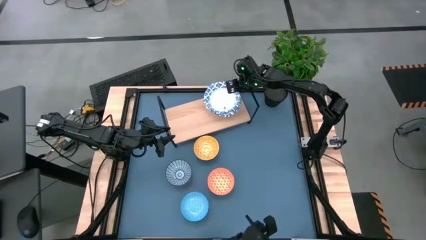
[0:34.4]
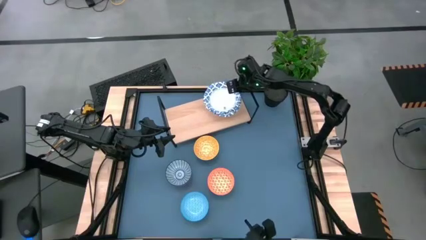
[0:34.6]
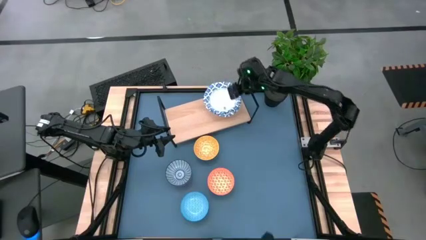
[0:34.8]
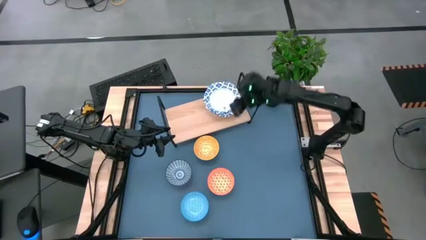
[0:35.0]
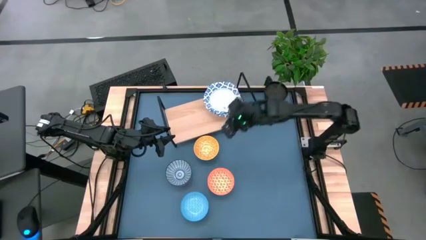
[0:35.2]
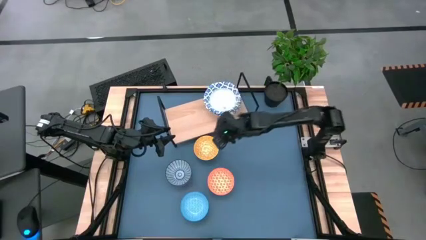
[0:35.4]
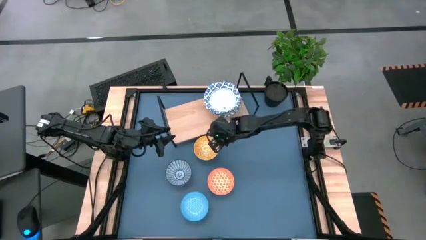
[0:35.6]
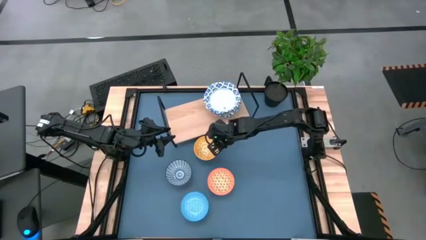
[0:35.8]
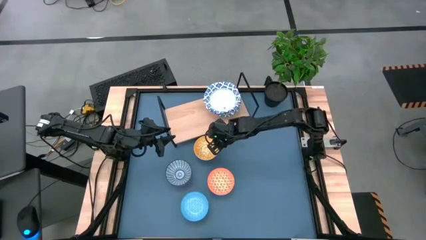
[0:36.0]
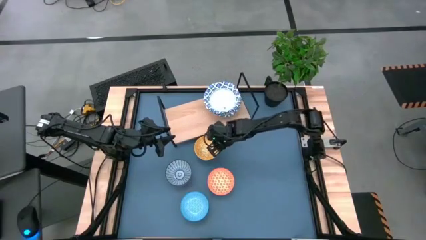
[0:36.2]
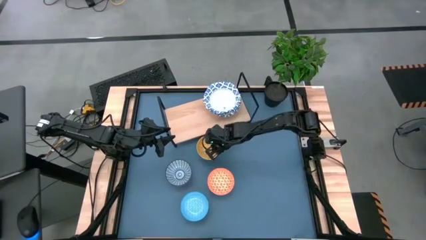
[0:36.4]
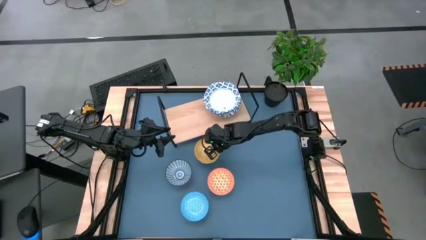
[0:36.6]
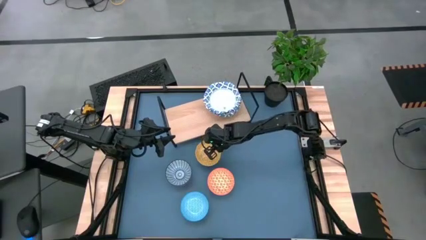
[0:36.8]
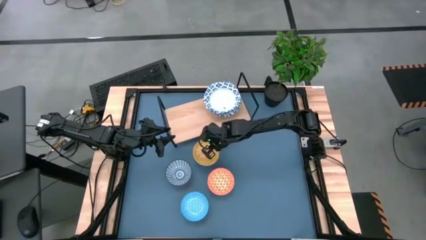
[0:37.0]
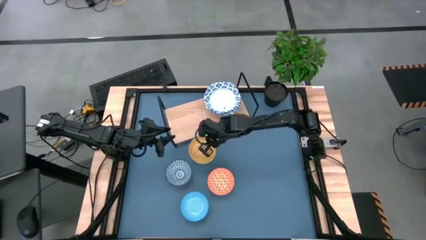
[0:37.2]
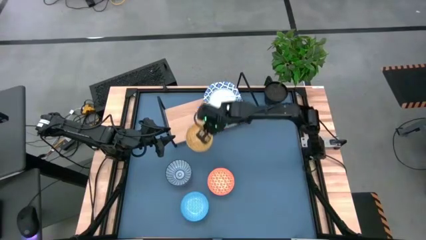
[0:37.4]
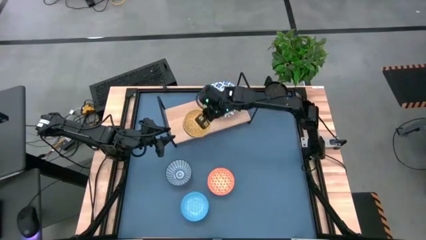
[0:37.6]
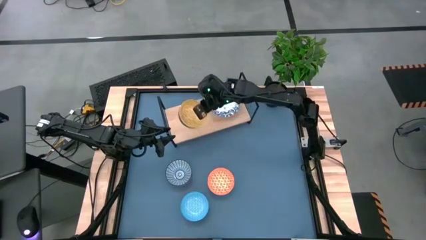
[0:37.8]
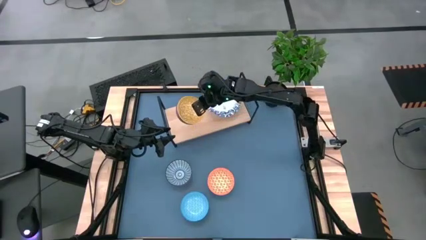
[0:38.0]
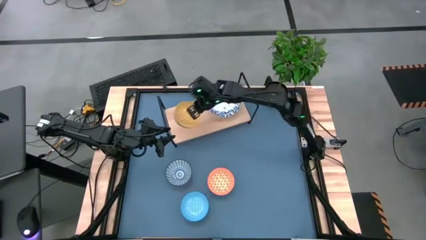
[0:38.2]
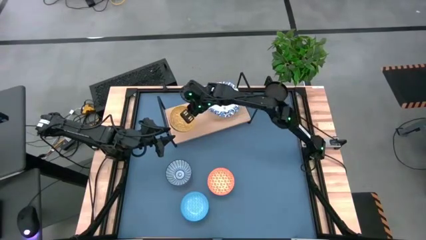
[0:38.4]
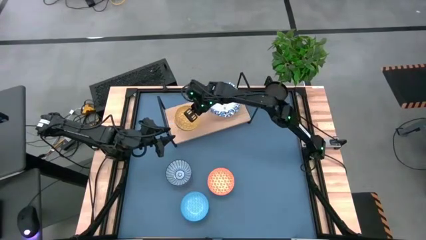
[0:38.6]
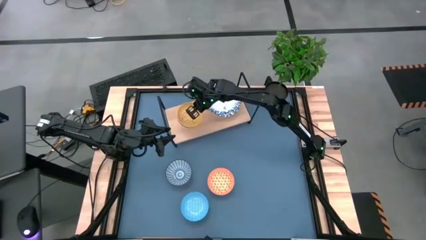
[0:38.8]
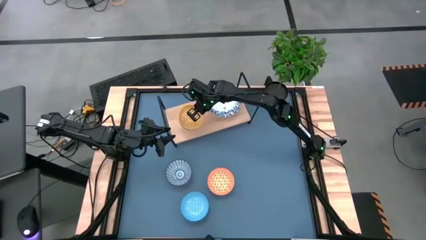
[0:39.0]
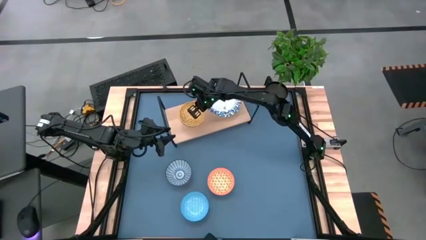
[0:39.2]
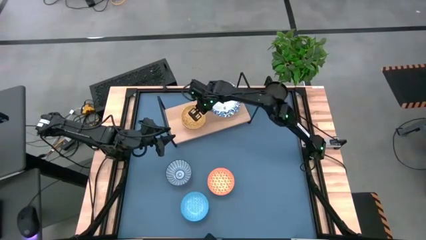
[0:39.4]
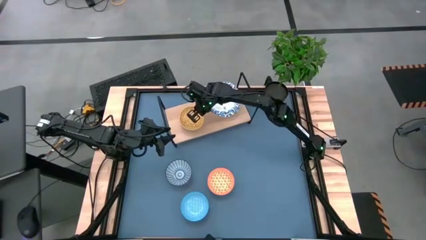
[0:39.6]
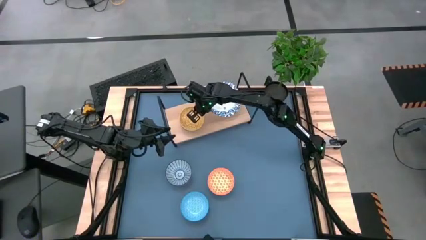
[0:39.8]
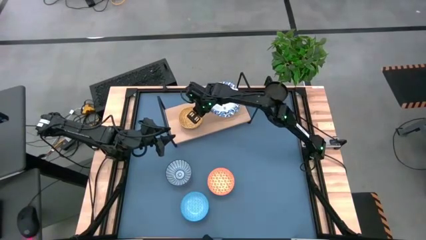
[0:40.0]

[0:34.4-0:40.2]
Task: Place and stack bowls onto a shelf
Put the yellow patterned bowl on the shelf

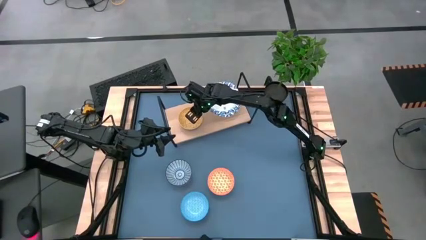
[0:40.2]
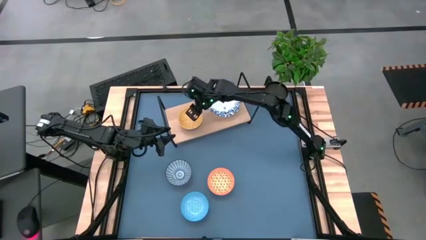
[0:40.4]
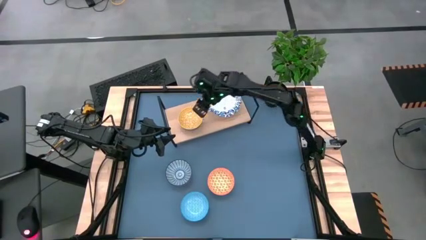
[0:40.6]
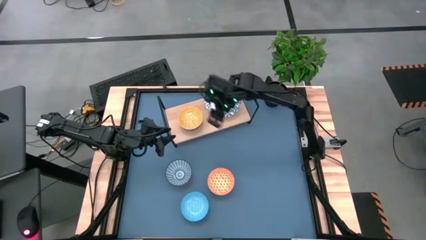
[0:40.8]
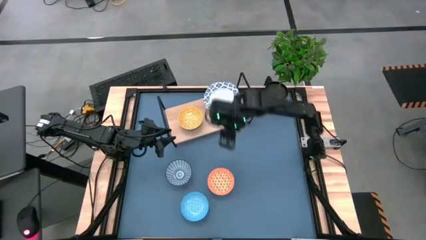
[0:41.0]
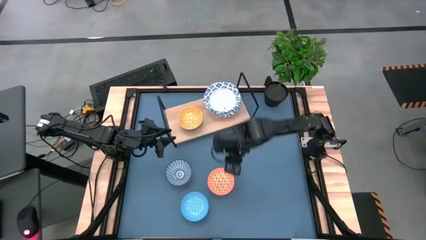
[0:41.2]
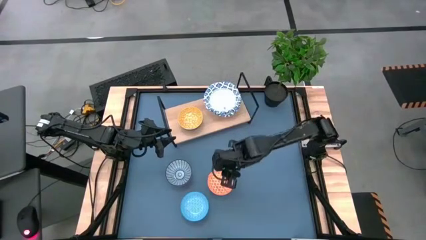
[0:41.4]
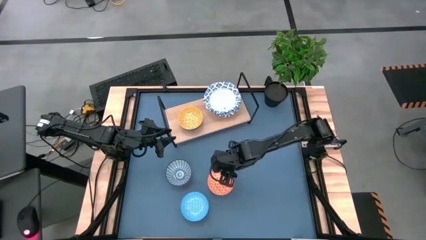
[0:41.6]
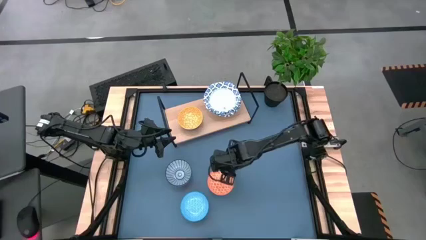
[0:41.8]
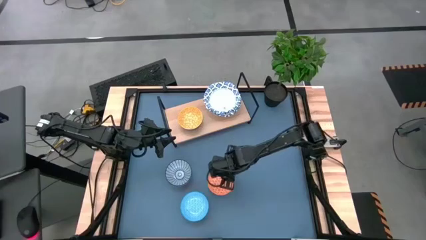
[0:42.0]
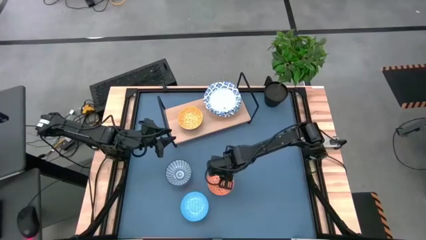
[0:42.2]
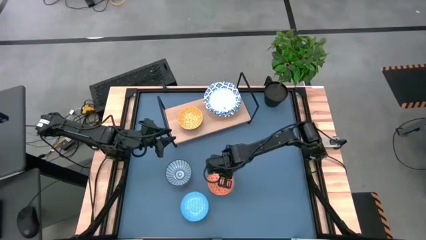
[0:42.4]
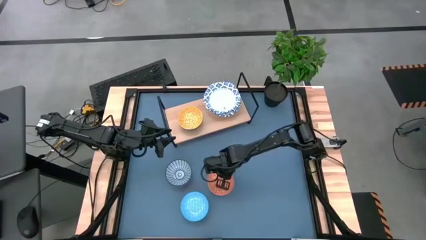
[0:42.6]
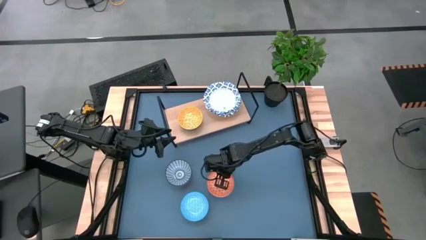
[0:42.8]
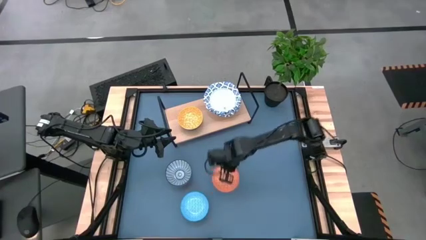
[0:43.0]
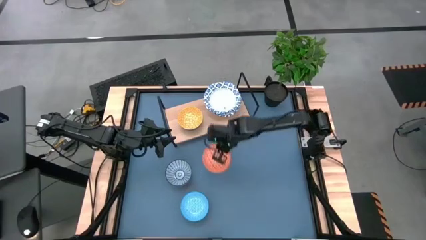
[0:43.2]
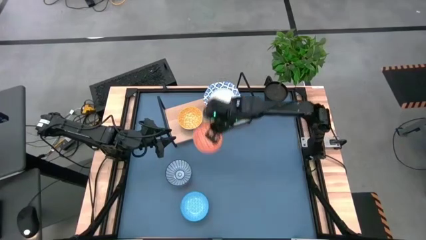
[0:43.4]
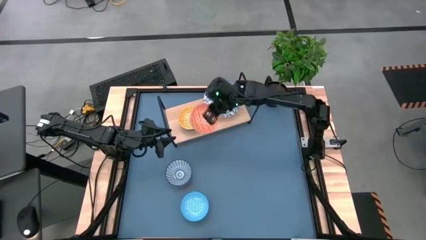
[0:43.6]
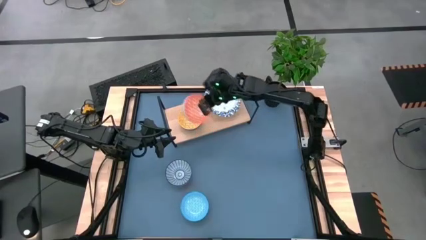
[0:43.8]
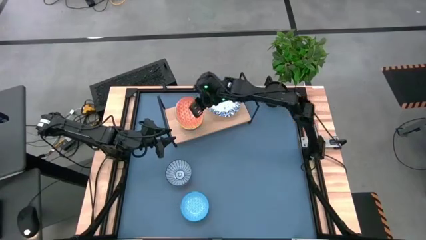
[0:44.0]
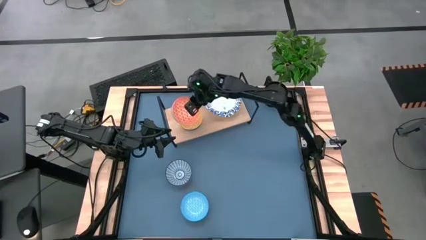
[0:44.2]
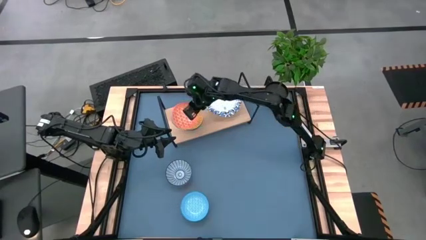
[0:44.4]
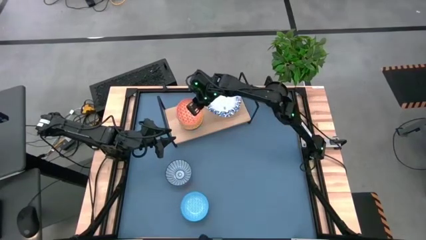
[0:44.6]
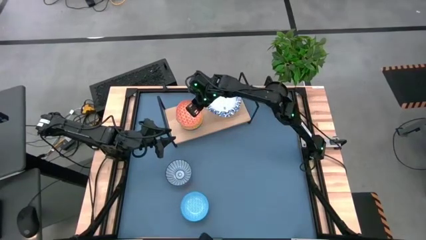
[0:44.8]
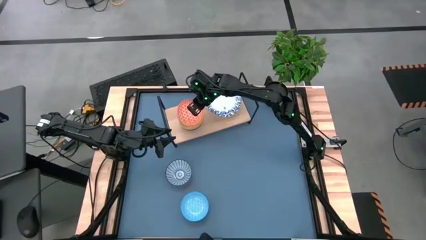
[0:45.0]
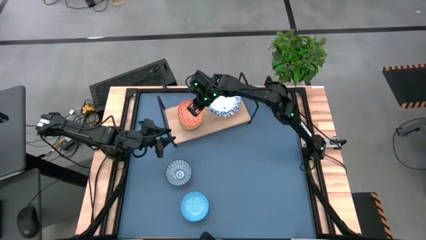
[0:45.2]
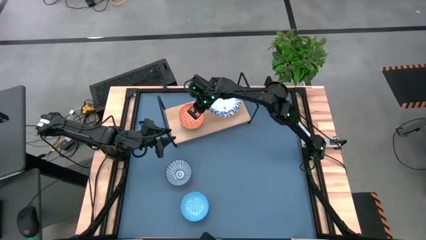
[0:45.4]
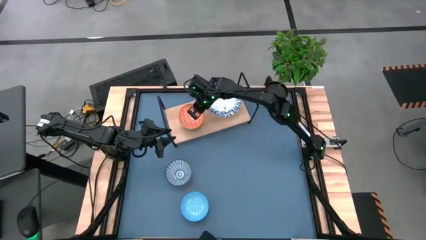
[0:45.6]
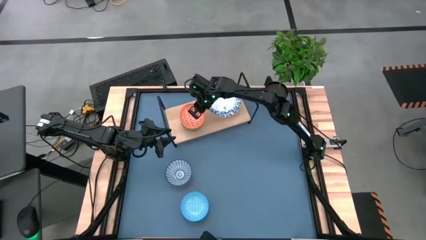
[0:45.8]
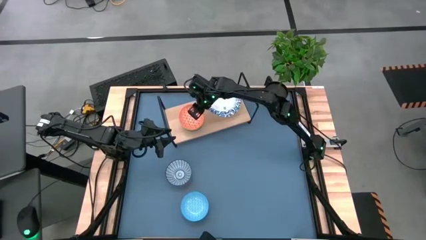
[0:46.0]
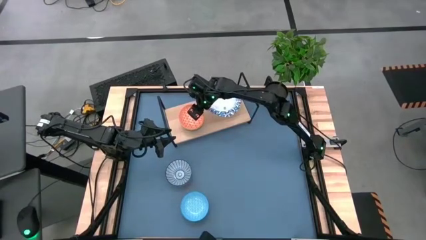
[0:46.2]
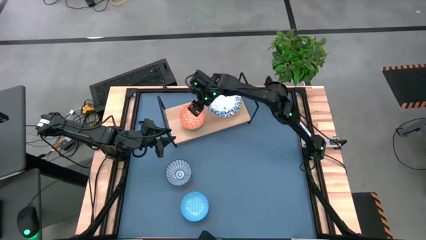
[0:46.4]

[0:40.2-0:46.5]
Stack the orange patterned bowl on top of the yellow patterned bowl on the shelf

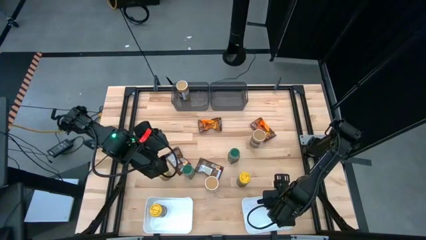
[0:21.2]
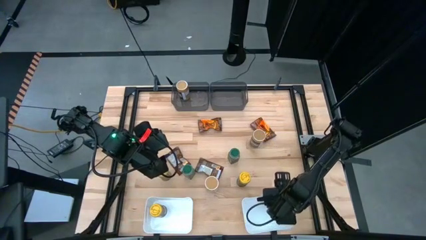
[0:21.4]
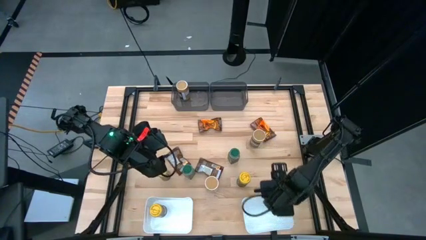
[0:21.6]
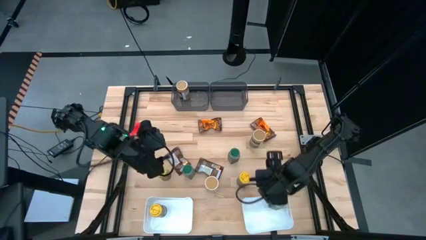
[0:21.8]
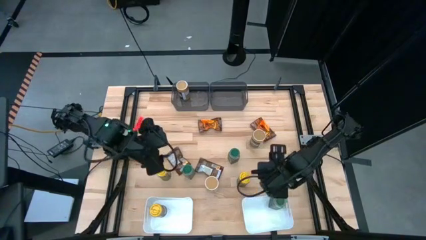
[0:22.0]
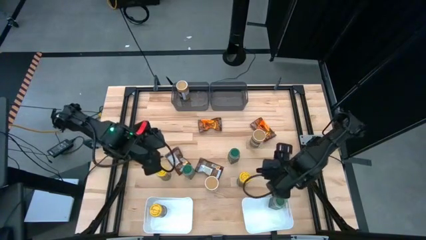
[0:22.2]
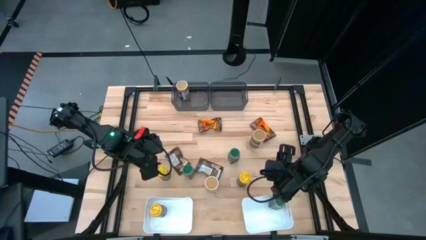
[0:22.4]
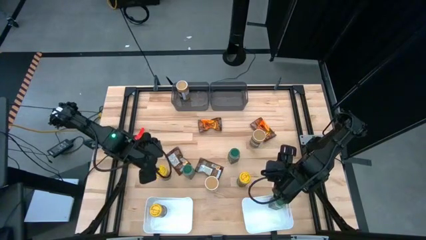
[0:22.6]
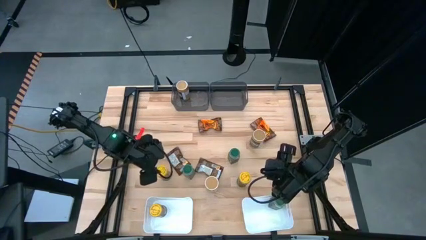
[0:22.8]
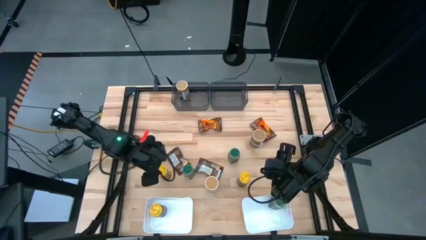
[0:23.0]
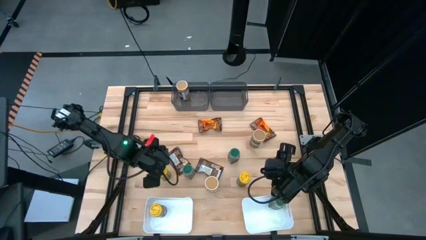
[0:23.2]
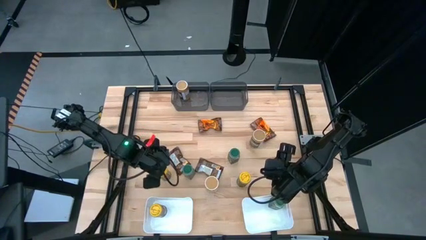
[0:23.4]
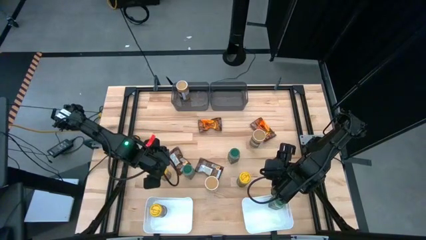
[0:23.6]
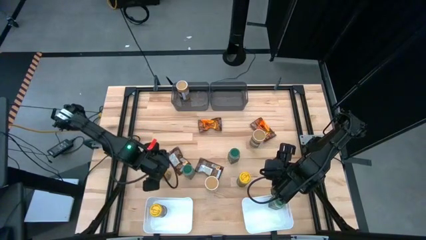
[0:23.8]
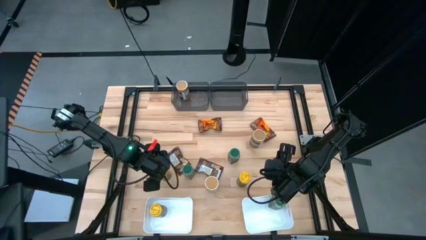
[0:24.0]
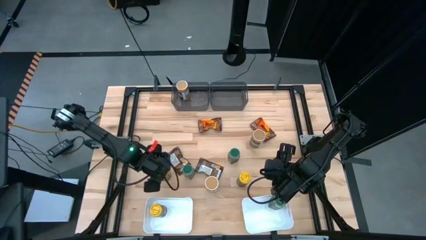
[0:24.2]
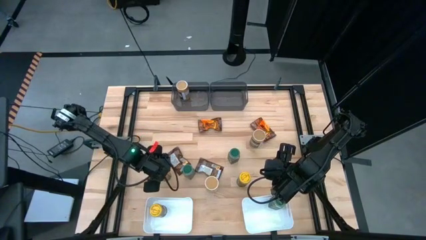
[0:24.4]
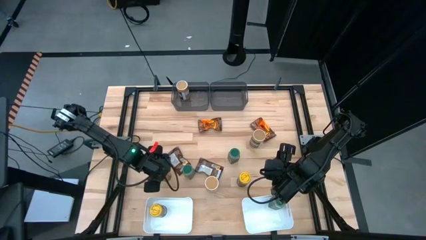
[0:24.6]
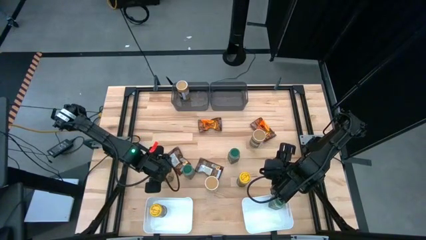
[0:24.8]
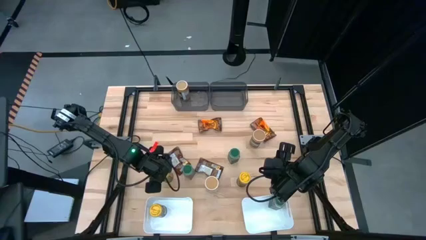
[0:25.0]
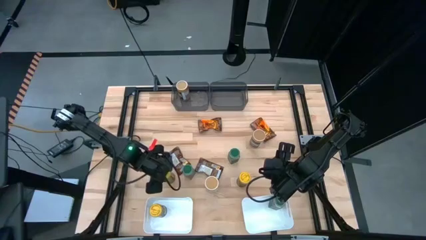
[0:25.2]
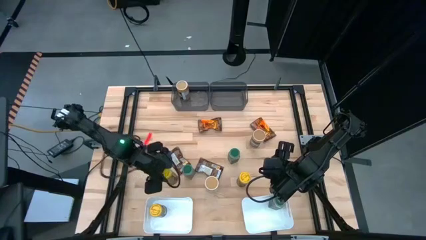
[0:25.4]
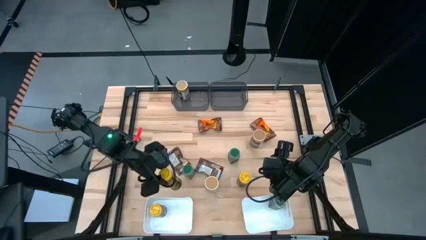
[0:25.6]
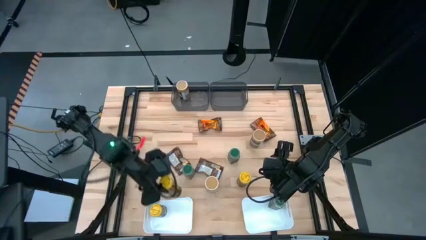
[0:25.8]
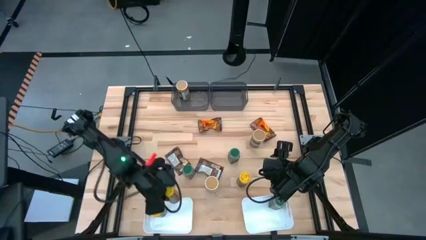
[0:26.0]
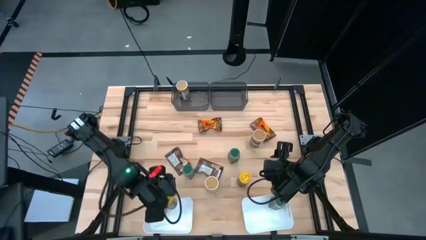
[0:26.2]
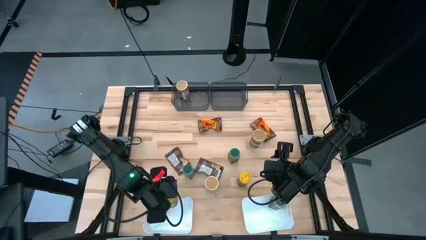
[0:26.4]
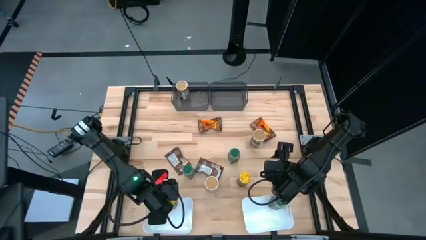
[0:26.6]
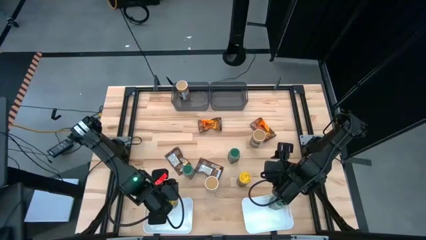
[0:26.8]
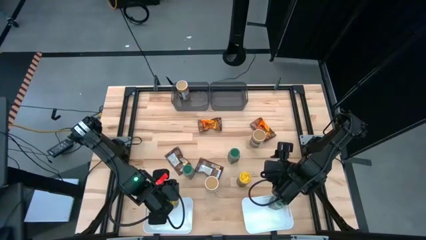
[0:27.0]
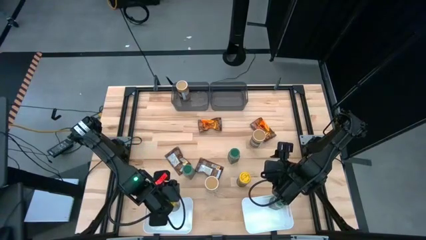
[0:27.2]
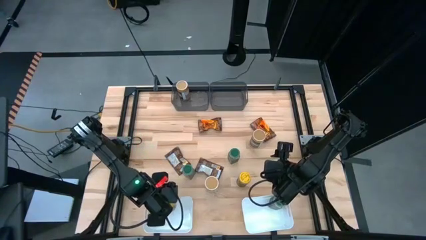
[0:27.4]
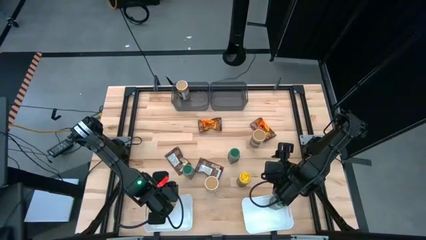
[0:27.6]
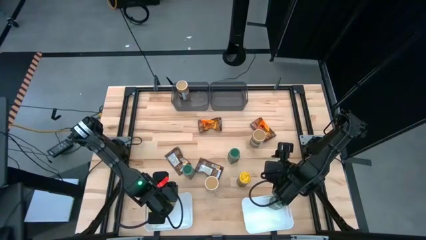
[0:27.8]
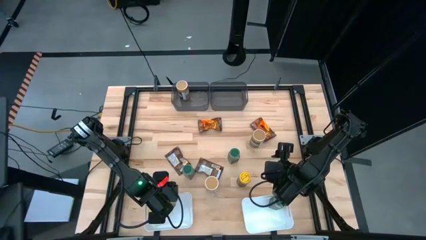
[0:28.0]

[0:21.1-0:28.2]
Task: Sort spices by type
Put the right yellow seasoning bottle into the left white bin
